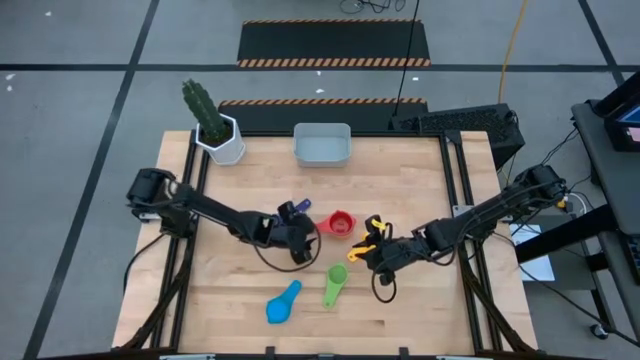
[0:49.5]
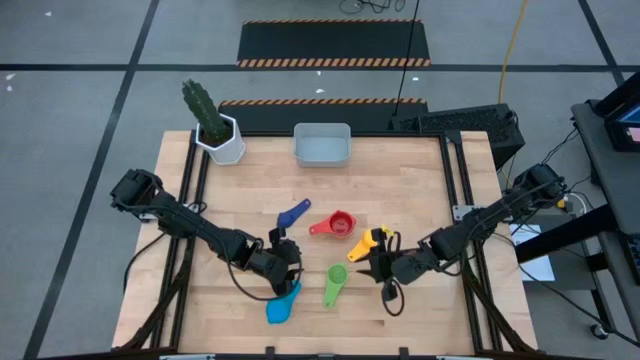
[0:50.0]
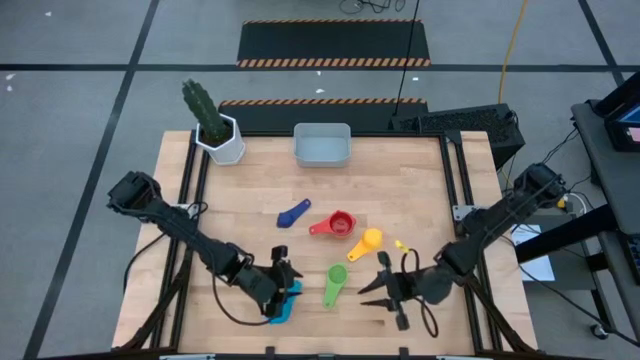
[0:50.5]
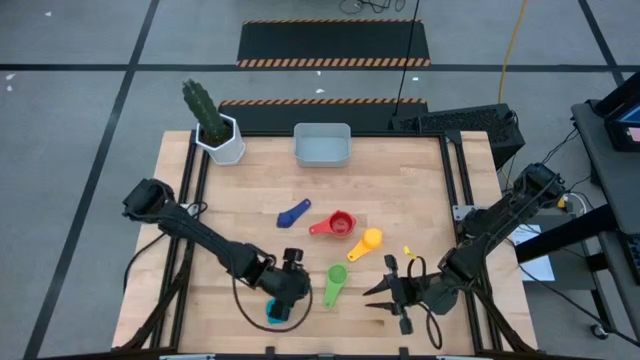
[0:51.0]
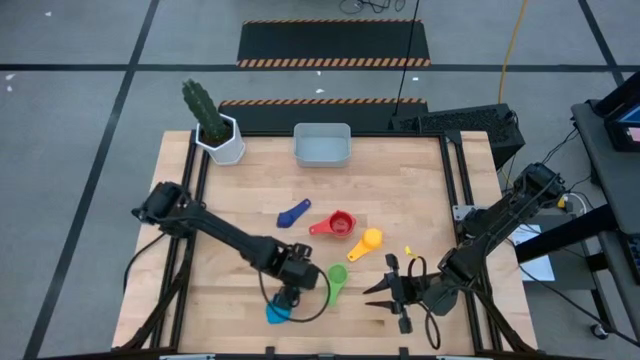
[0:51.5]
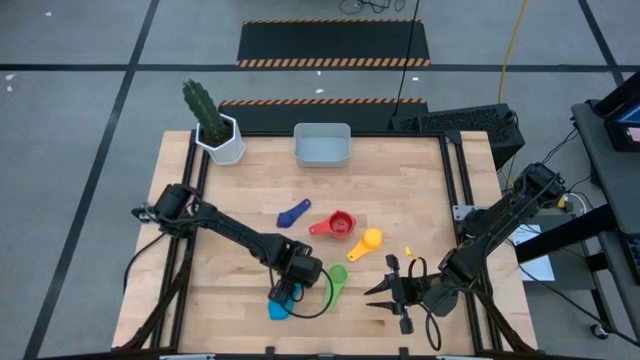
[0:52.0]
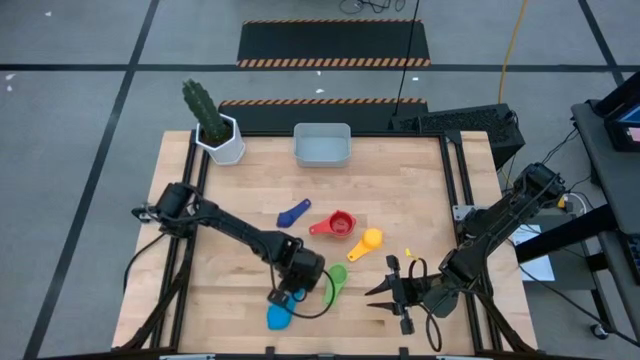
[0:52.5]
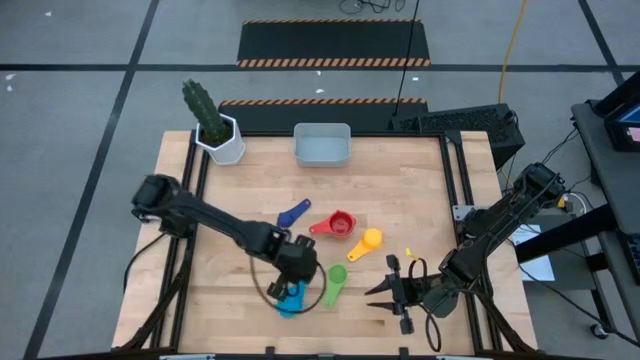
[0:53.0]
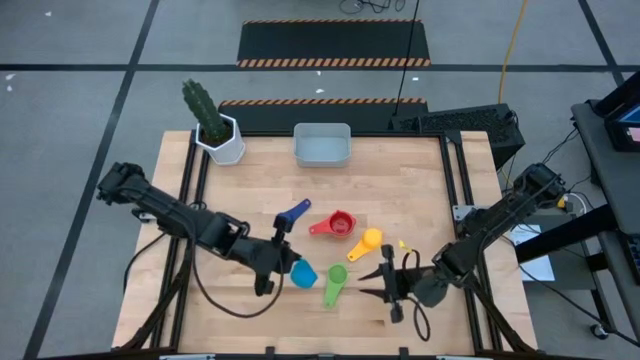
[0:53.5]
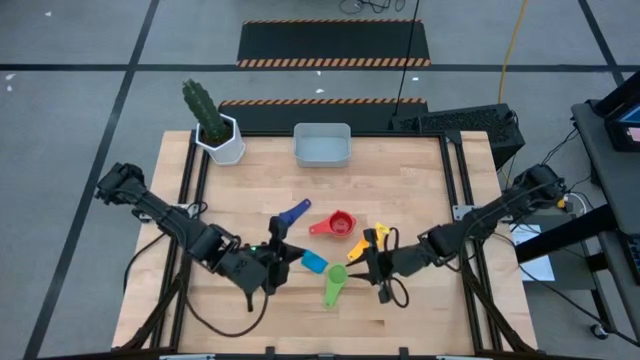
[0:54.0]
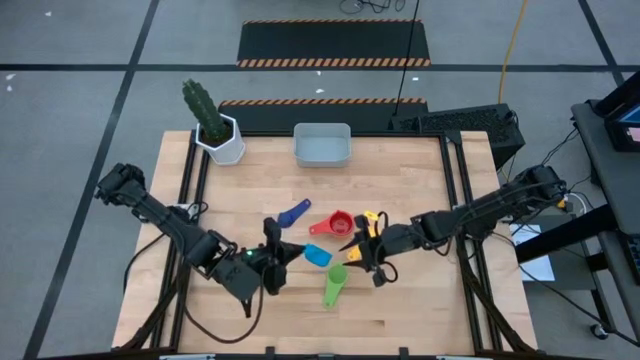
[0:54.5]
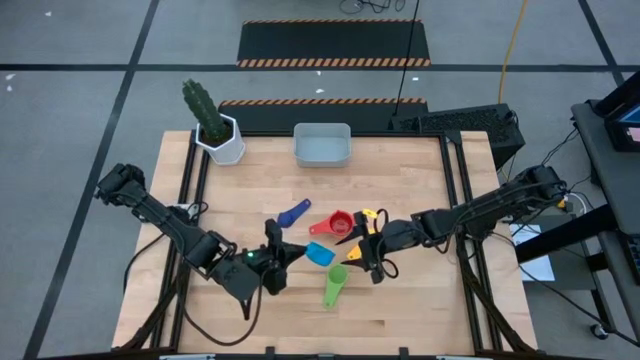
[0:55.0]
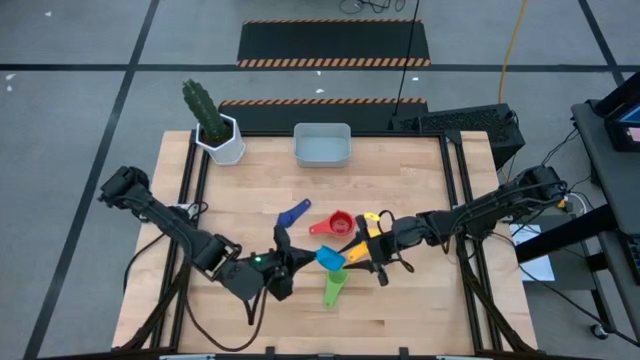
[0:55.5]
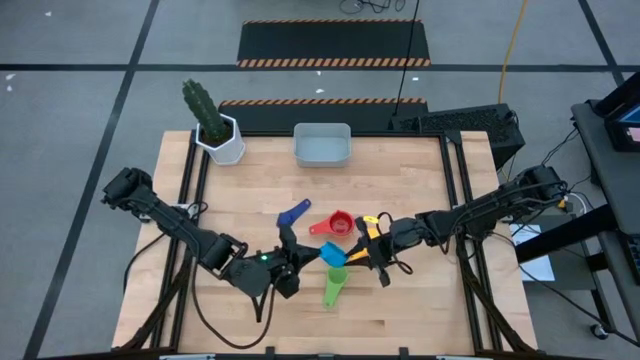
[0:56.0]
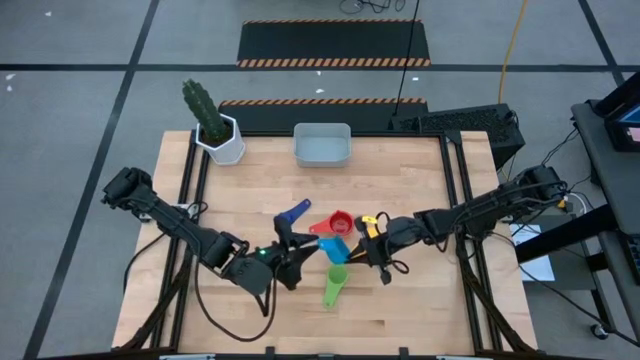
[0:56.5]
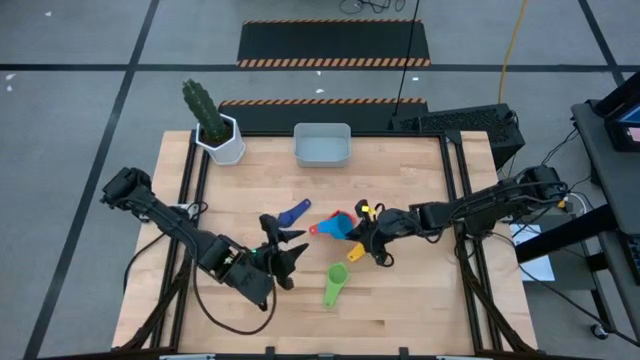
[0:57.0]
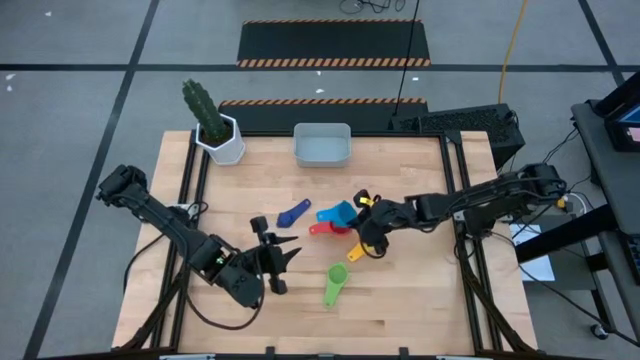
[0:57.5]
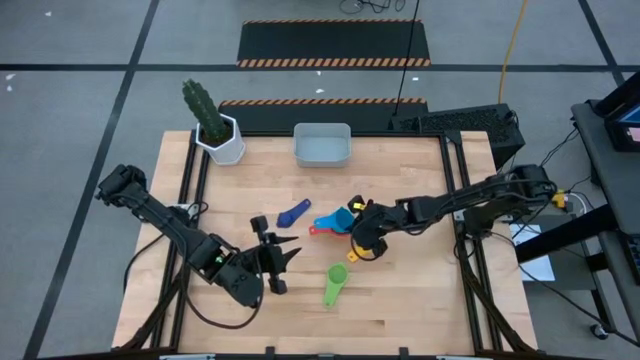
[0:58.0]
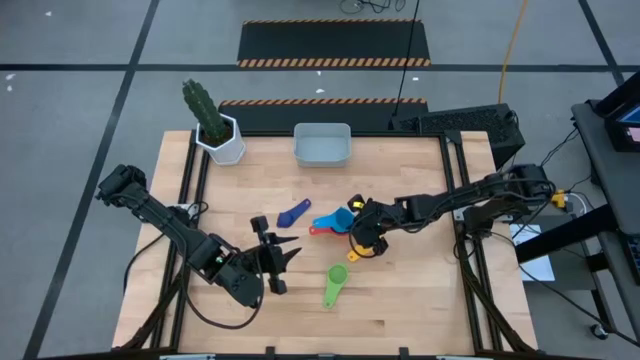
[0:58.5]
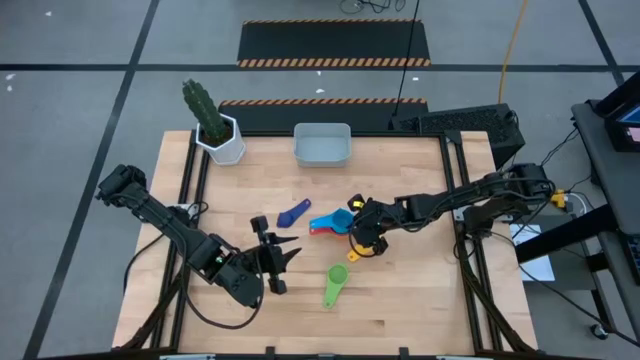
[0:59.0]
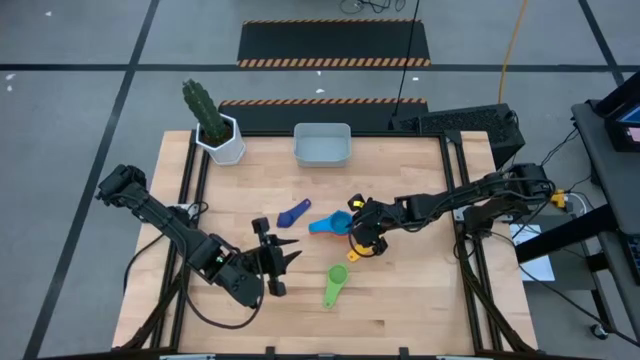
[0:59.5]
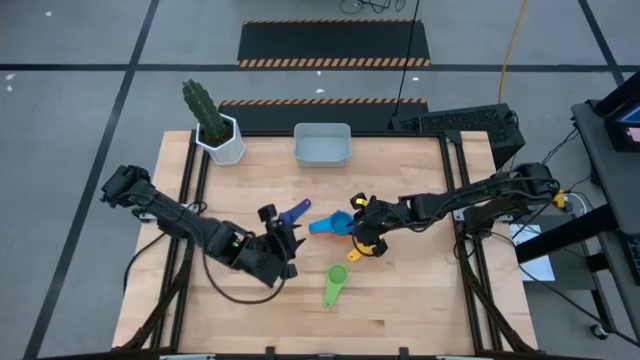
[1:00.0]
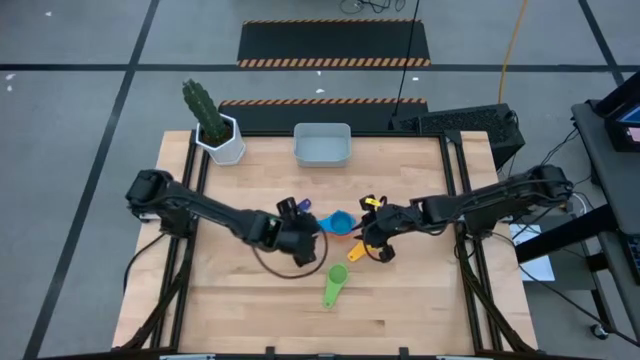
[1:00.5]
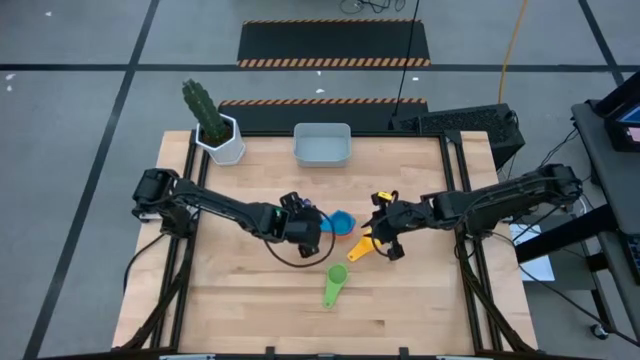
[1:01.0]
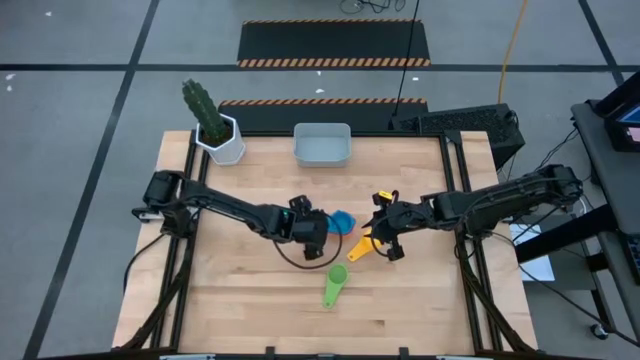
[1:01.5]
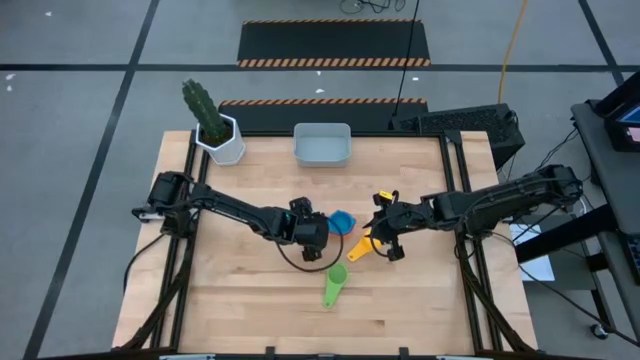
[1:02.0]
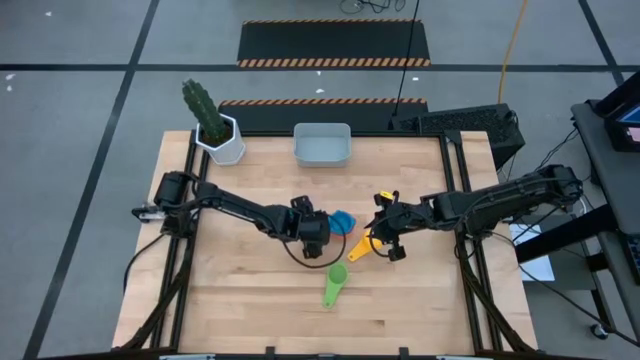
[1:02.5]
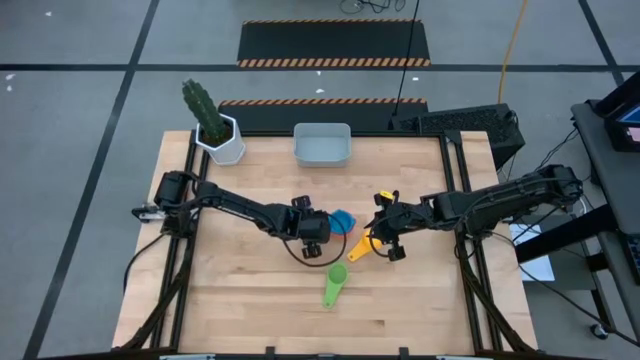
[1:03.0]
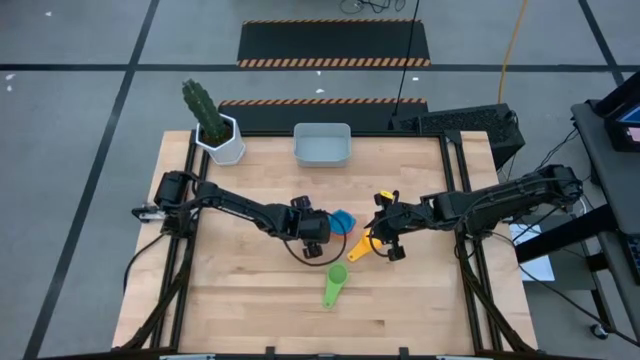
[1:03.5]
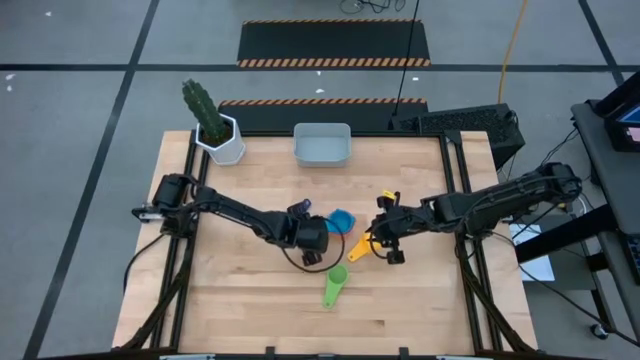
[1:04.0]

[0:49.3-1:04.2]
Task: Nest measuring cups in basket
Stack the light blue measuring cup on top of the red measuring cup

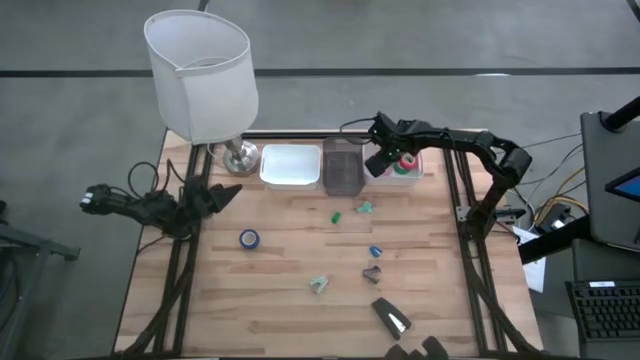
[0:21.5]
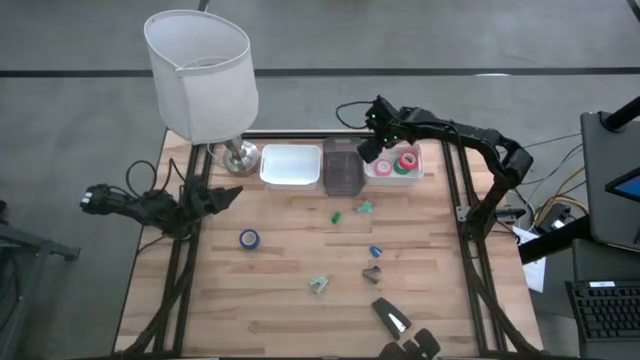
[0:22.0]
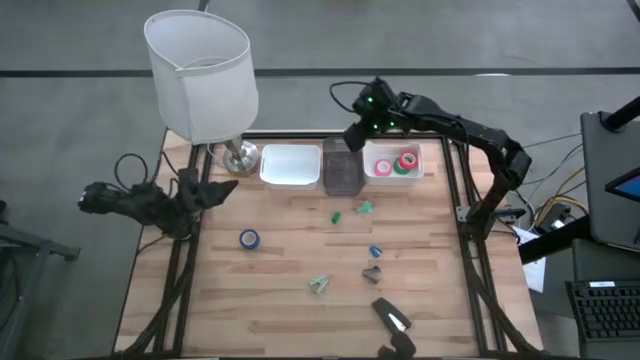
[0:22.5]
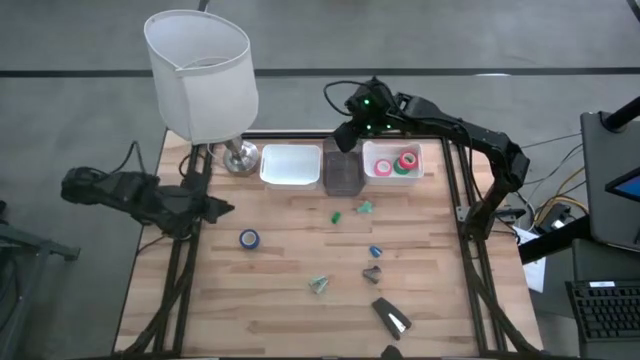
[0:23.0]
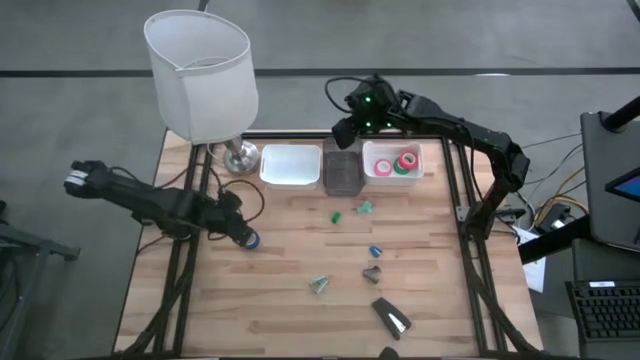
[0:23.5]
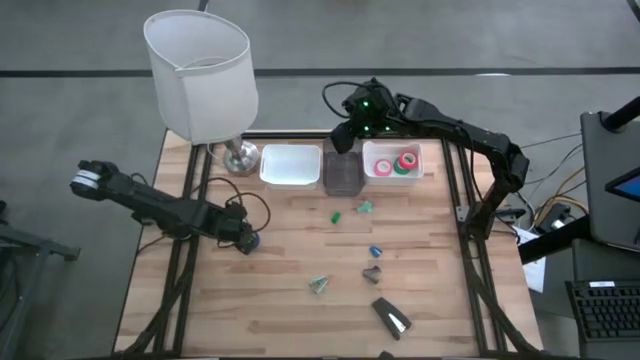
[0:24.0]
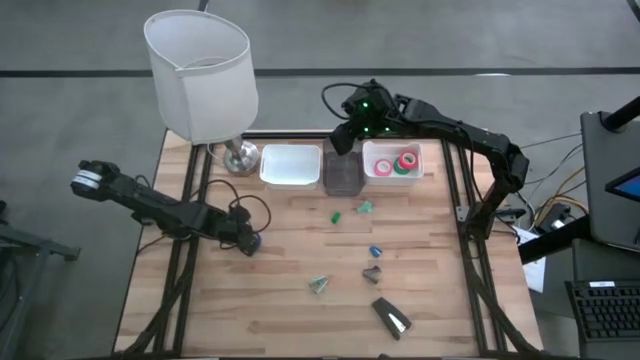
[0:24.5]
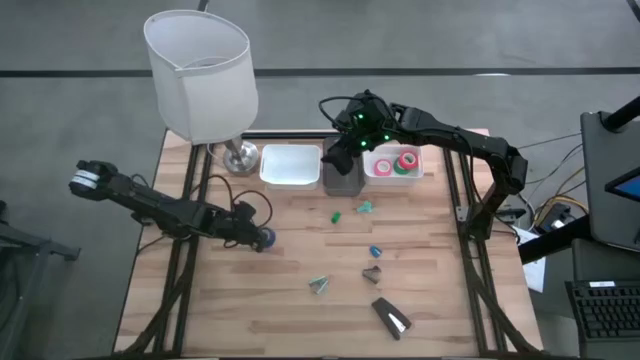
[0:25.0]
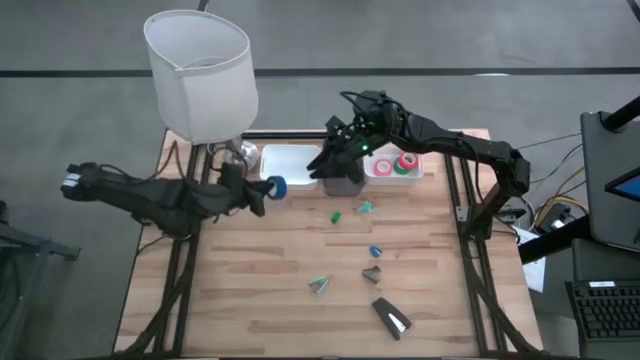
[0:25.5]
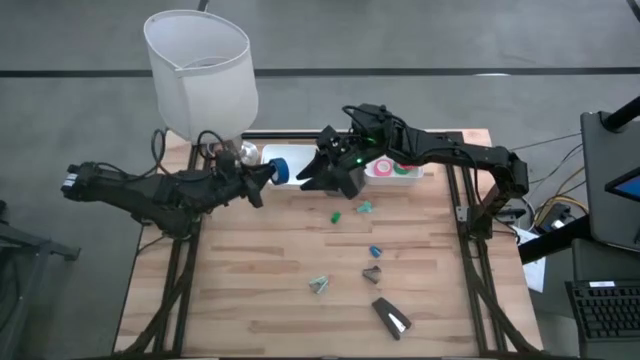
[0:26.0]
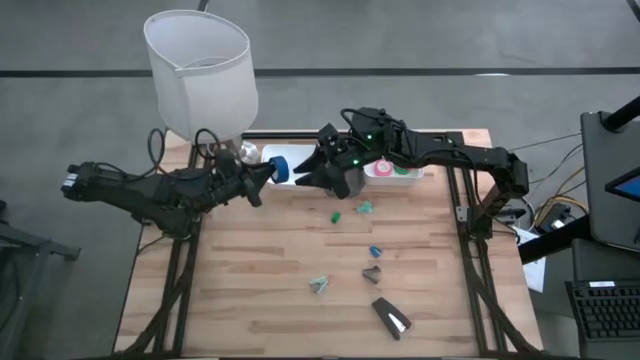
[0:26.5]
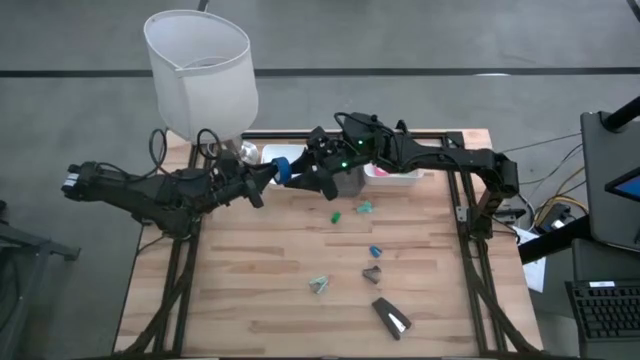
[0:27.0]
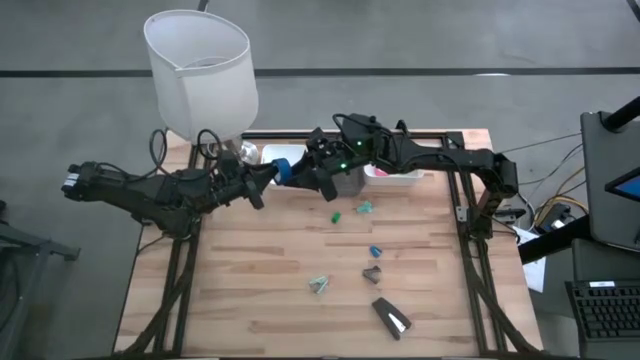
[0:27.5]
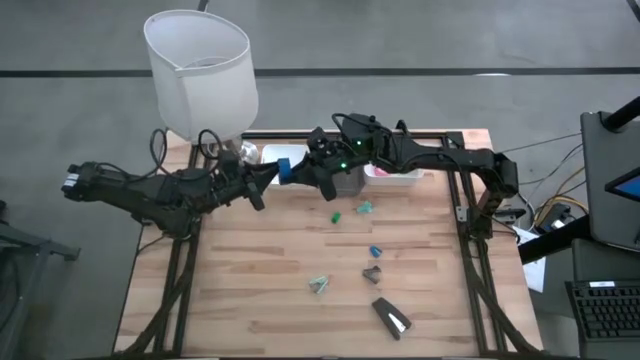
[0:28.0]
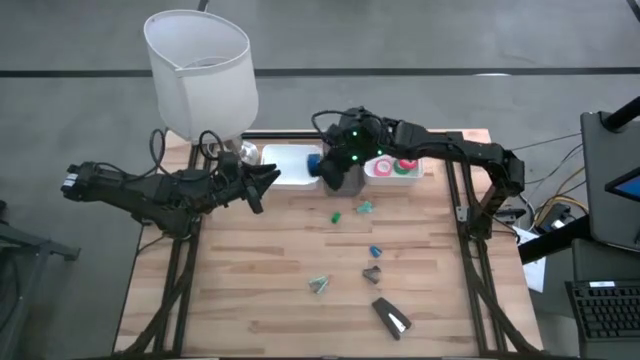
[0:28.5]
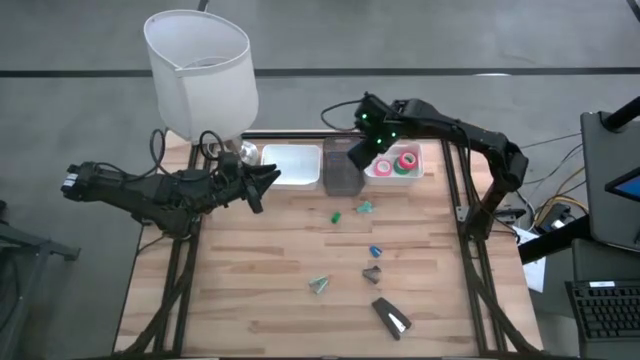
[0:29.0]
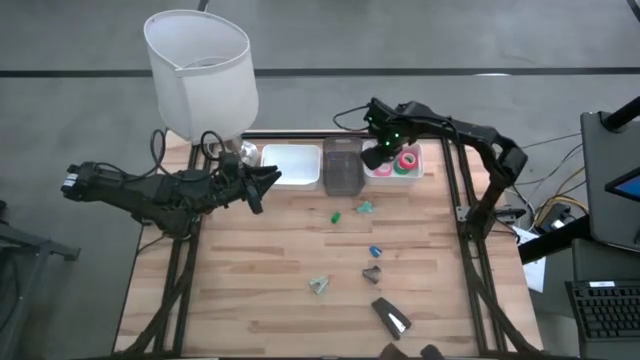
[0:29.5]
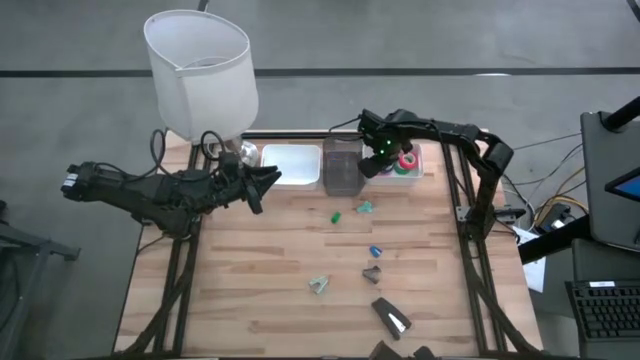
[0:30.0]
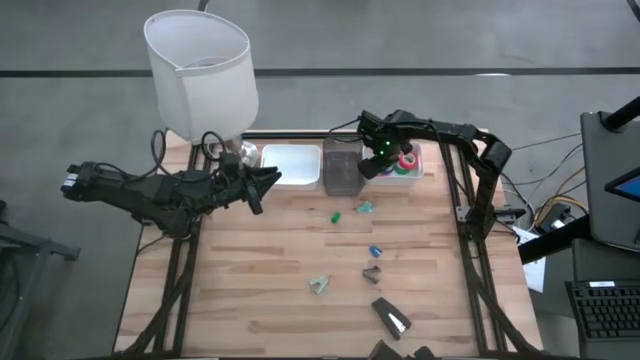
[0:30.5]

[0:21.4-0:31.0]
Task: Pick and place Stapler, Stapler remover, tape
Put the blue tape into the right white bin
